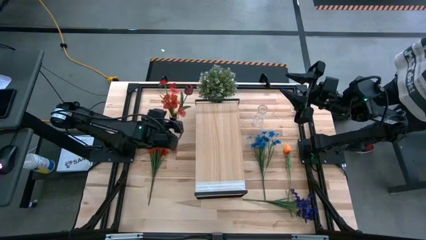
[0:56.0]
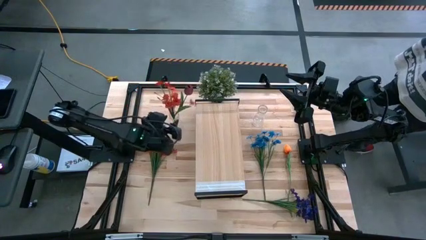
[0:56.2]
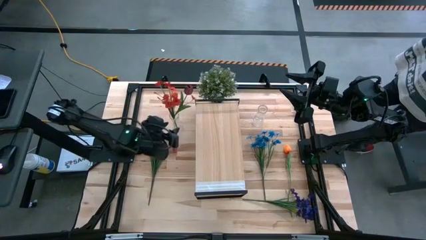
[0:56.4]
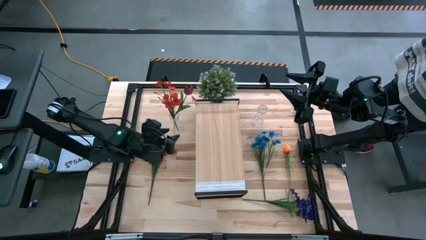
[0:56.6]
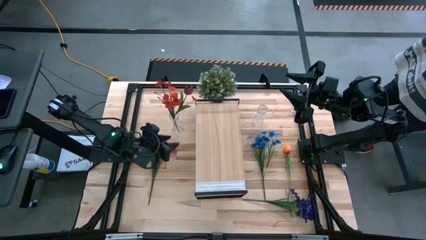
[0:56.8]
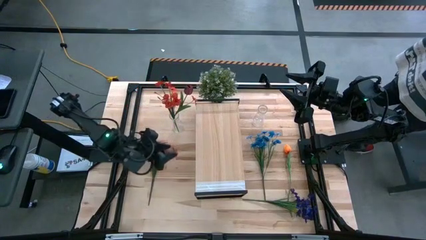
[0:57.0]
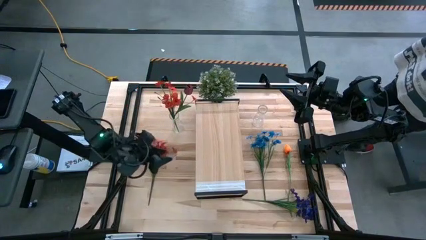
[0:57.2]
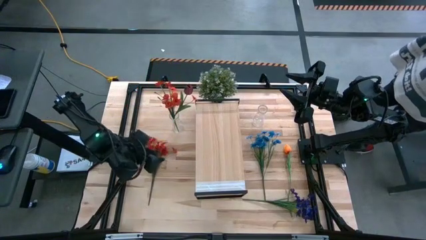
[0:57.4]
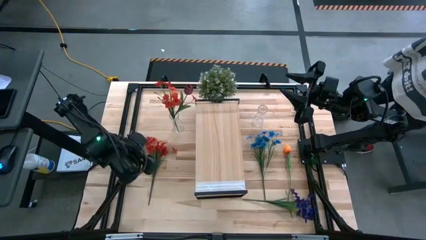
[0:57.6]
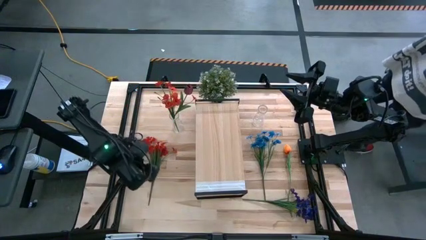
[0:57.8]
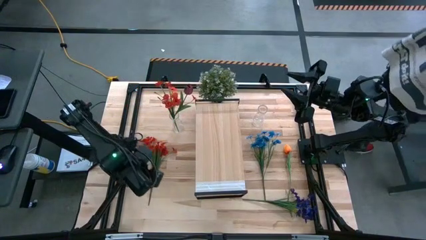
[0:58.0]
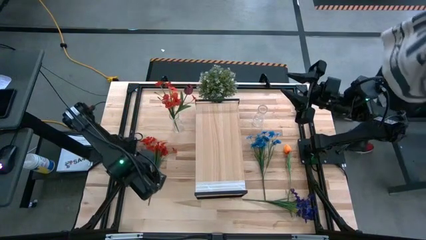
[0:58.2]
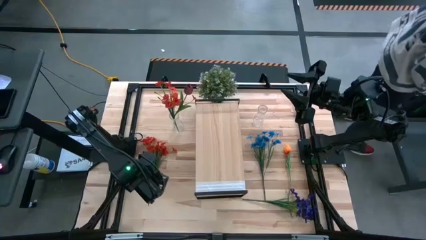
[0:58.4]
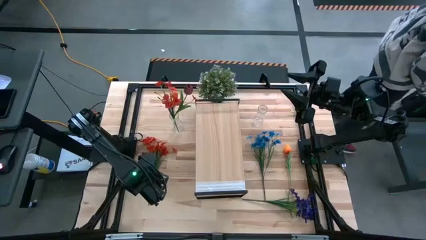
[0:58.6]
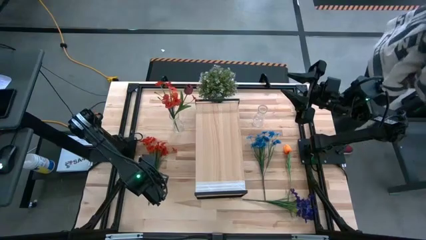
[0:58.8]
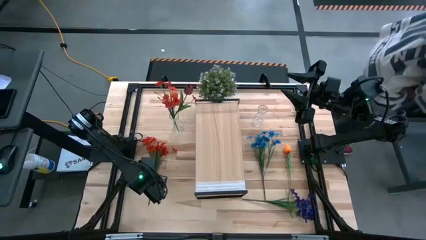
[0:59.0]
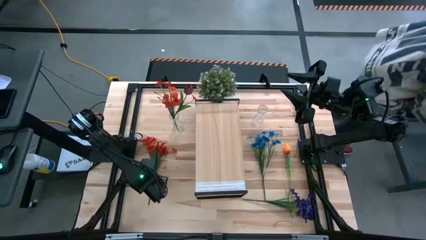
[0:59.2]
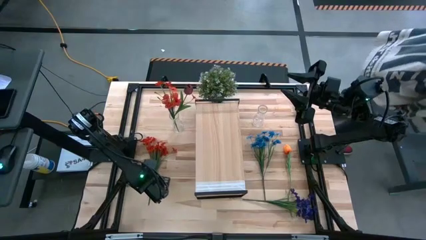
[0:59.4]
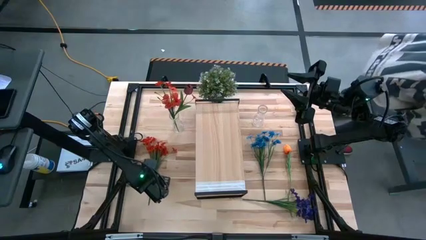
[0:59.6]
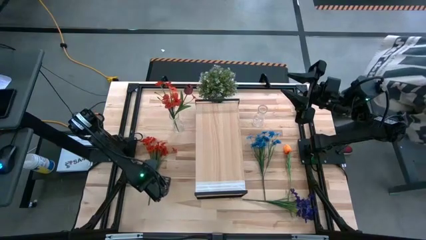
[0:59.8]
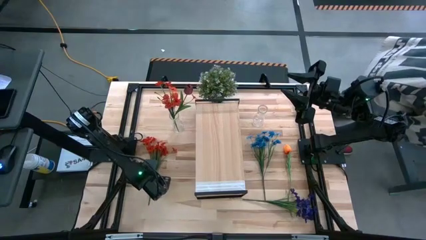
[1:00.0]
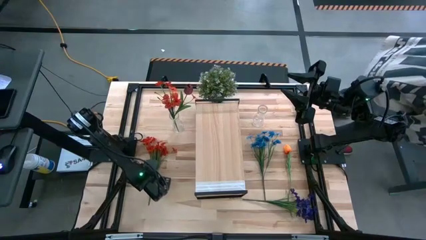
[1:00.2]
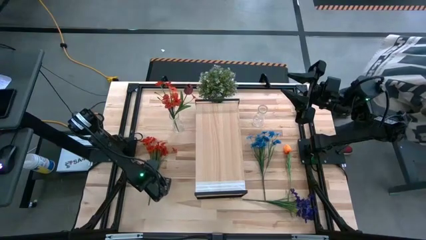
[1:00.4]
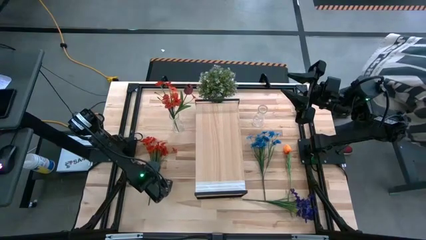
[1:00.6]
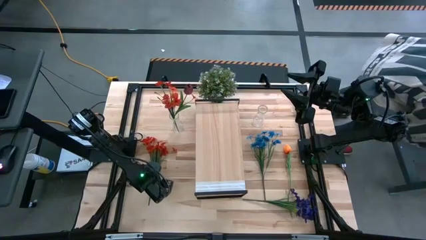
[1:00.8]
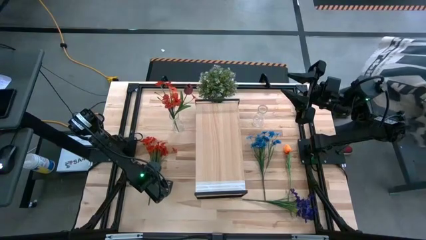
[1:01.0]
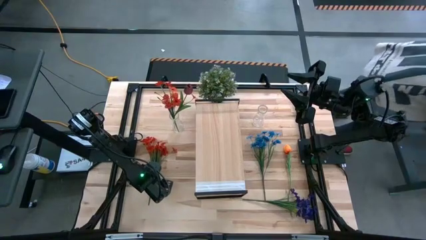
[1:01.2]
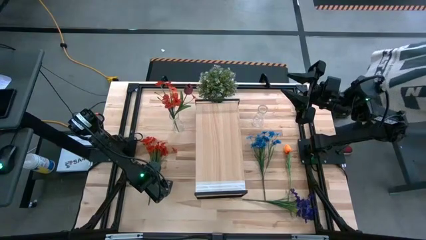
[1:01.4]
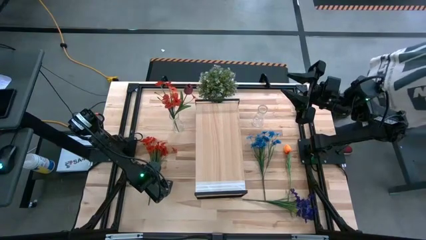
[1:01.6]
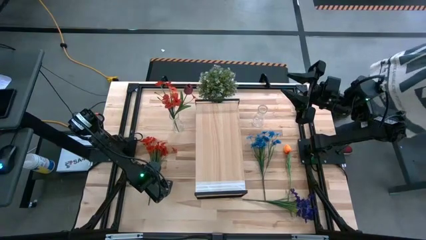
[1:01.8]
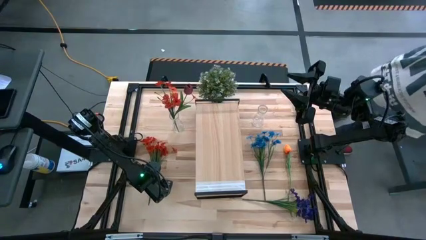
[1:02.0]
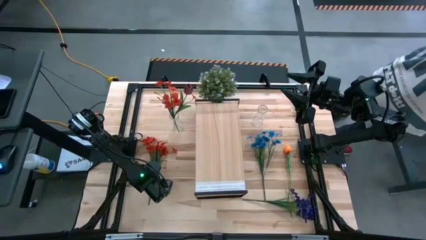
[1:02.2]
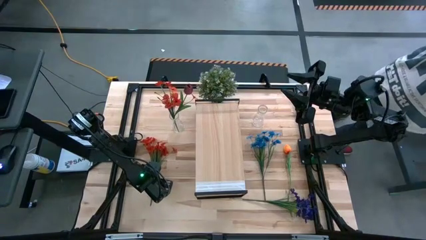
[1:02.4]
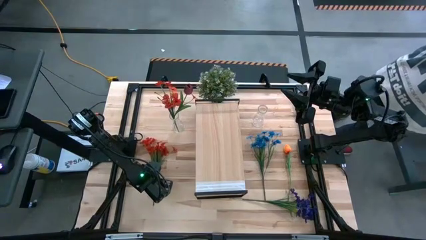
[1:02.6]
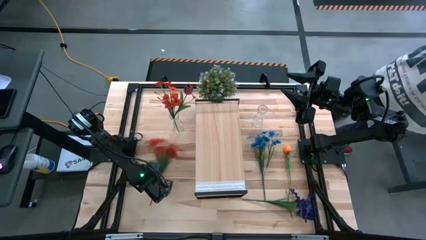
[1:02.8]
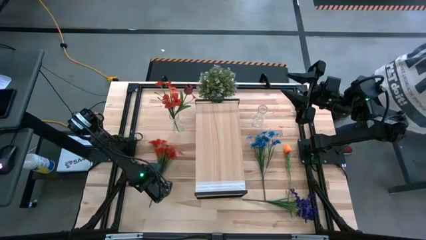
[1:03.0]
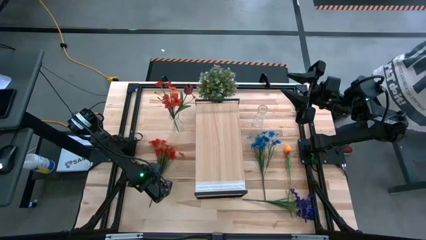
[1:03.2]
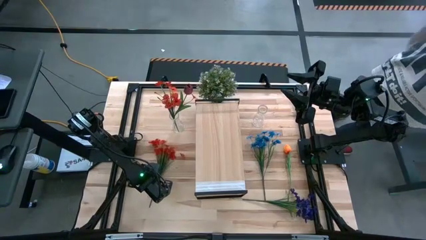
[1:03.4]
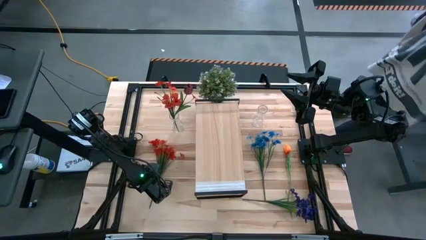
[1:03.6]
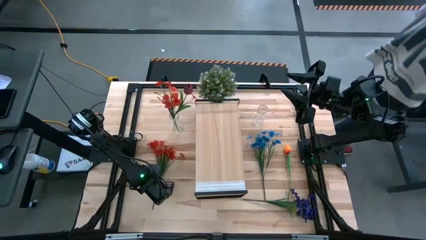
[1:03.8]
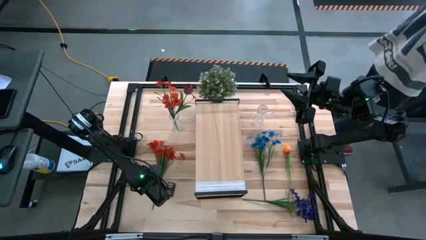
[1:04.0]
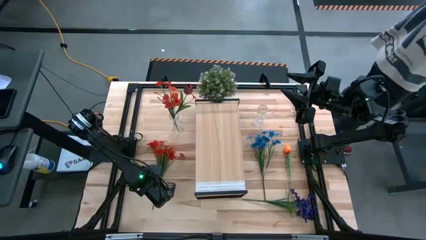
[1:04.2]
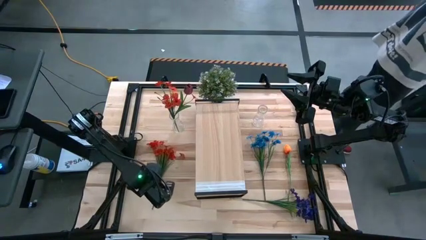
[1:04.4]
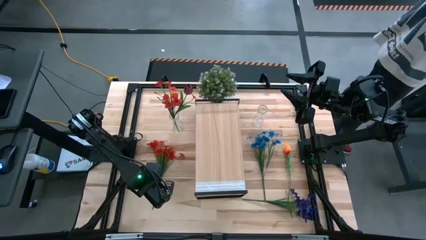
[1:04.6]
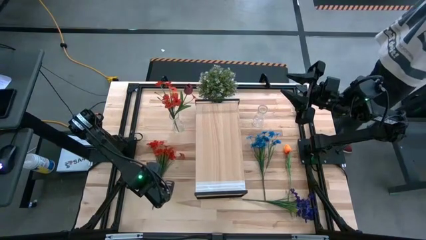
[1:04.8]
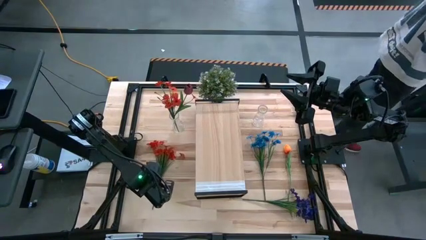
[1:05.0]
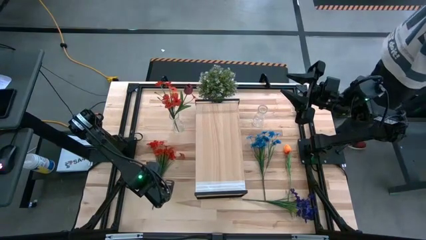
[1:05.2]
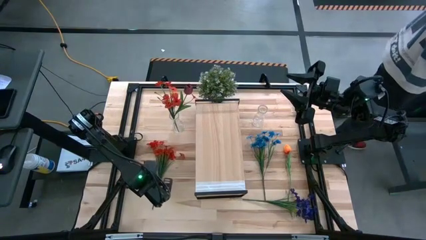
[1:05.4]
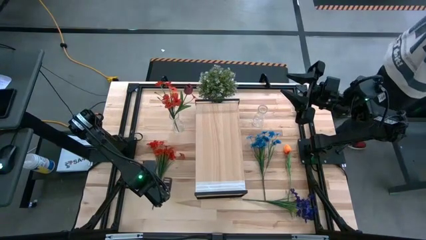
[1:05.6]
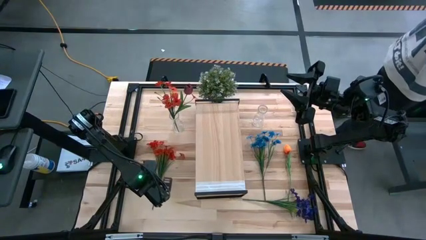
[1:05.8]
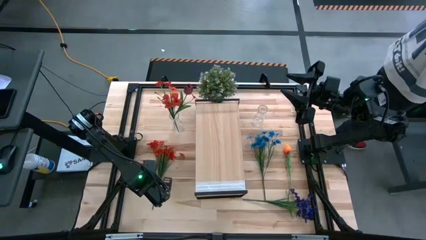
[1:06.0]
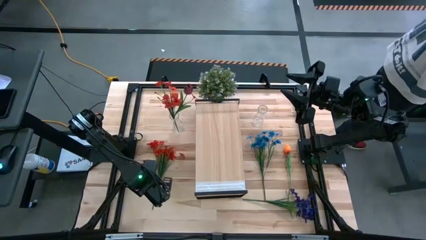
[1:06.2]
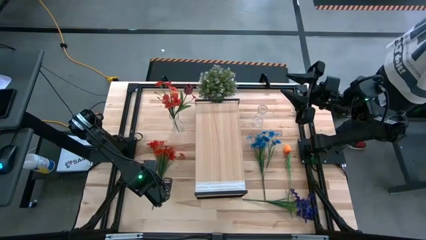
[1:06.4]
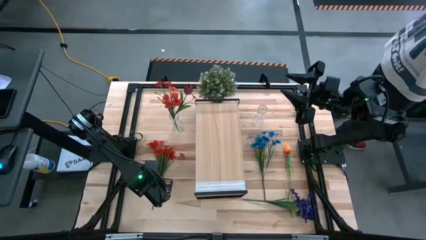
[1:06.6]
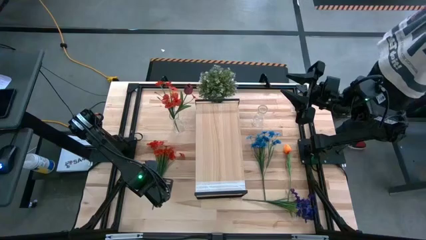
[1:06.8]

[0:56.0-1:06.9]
Task: Pick and place flowers into a vace then onto a shelf
Put the orange flowers into the left transparent vase
